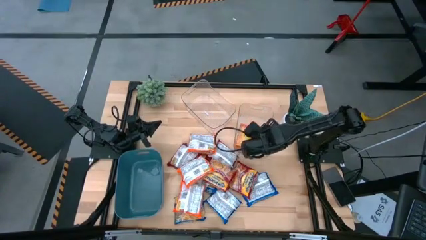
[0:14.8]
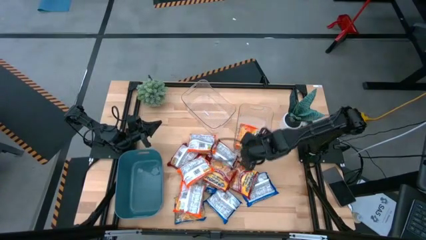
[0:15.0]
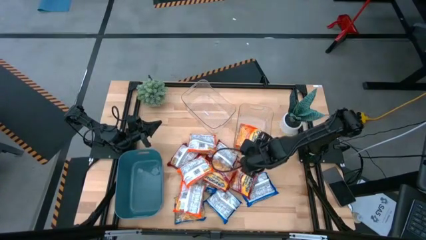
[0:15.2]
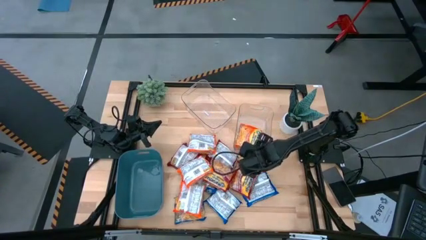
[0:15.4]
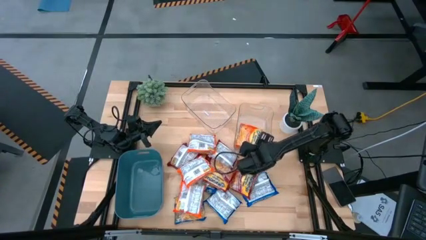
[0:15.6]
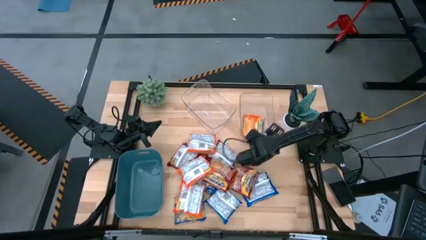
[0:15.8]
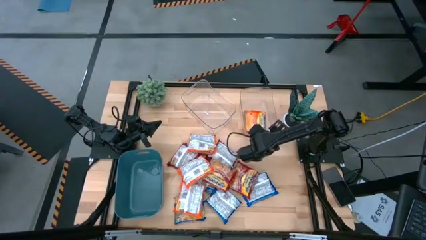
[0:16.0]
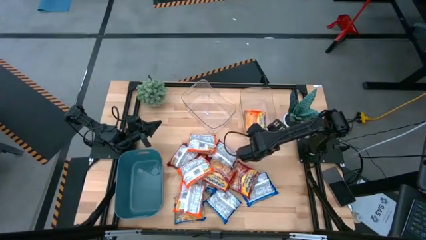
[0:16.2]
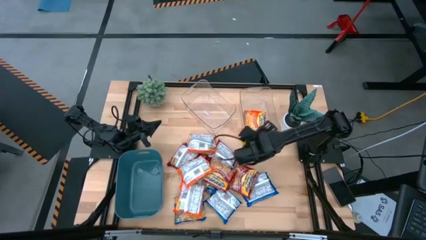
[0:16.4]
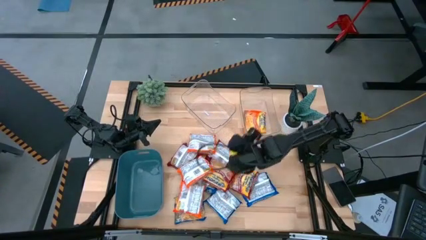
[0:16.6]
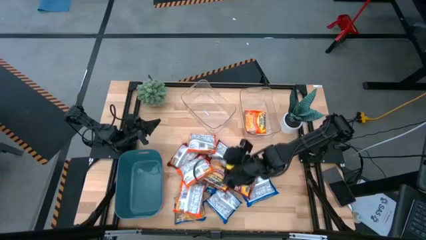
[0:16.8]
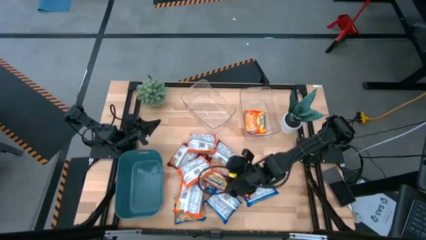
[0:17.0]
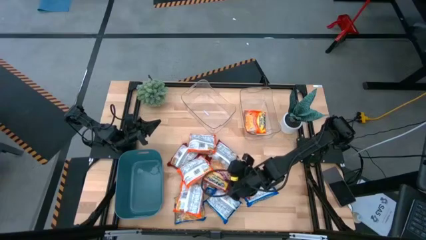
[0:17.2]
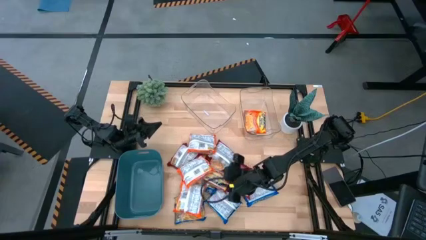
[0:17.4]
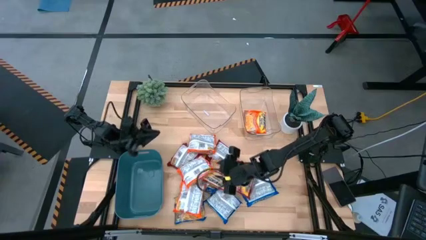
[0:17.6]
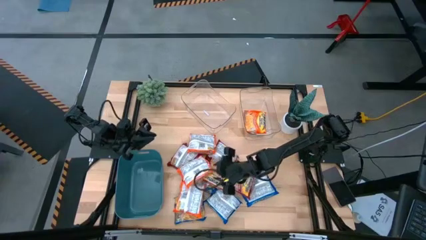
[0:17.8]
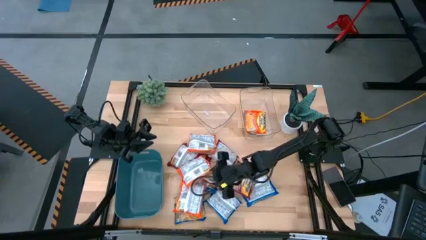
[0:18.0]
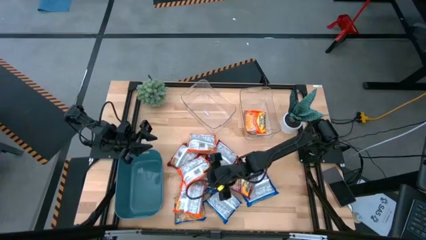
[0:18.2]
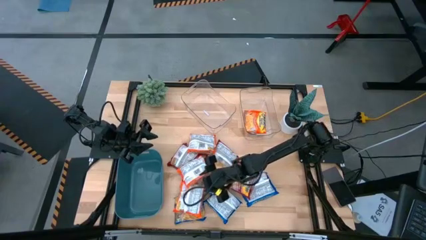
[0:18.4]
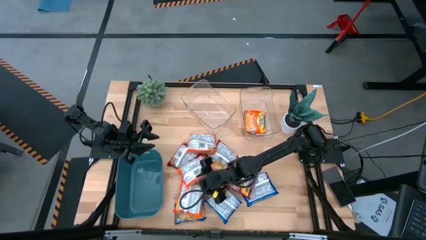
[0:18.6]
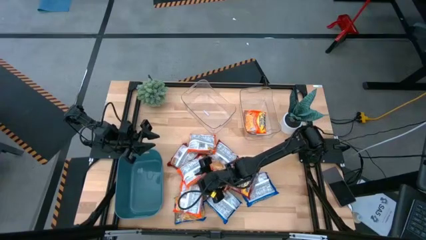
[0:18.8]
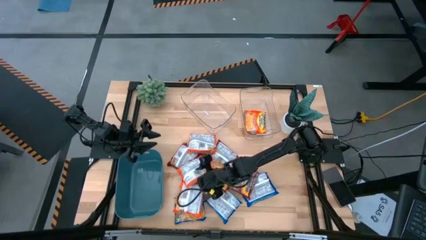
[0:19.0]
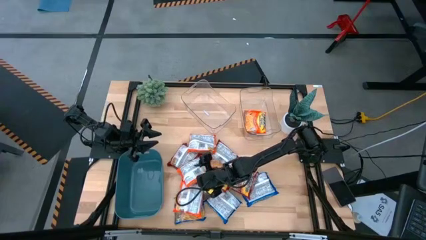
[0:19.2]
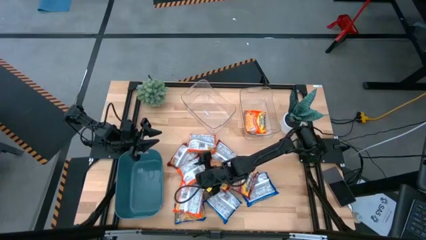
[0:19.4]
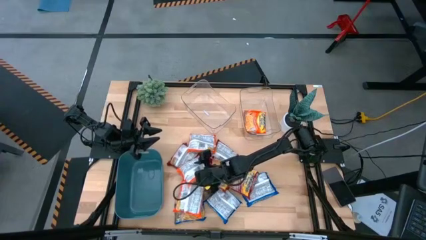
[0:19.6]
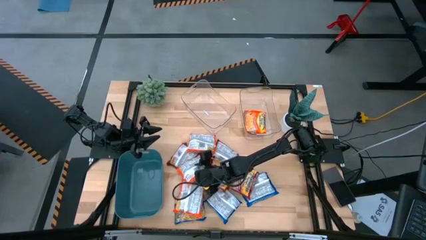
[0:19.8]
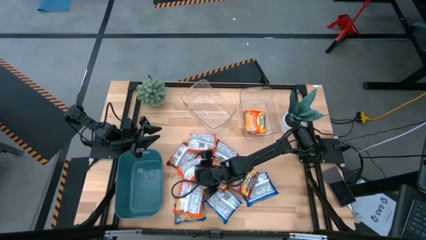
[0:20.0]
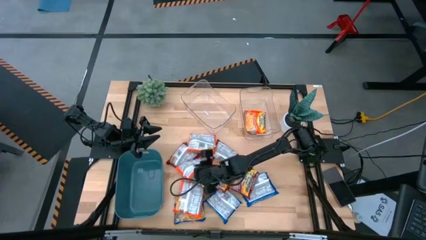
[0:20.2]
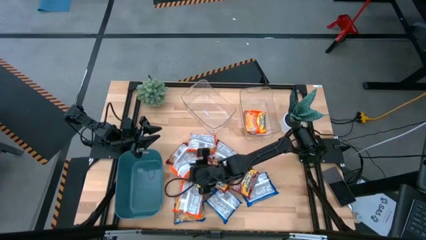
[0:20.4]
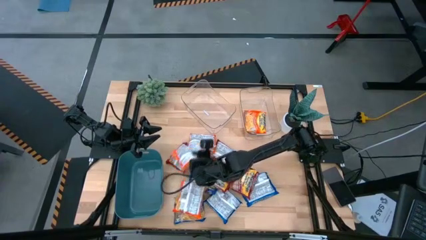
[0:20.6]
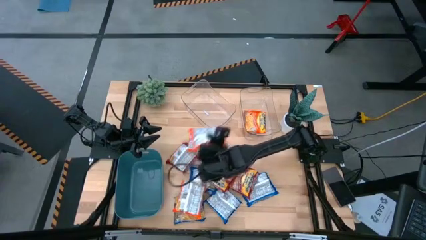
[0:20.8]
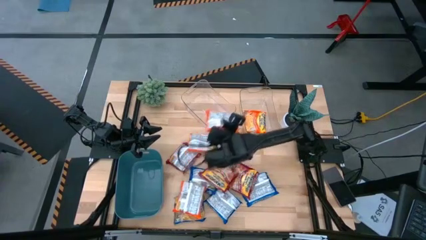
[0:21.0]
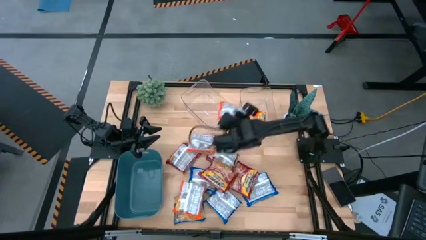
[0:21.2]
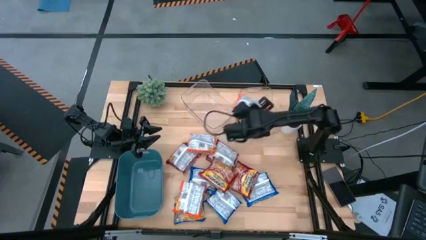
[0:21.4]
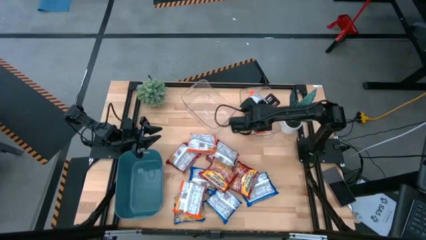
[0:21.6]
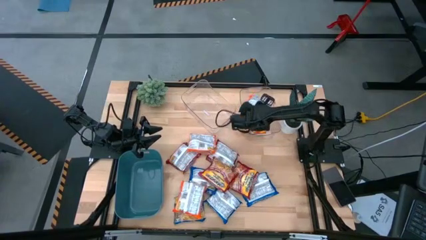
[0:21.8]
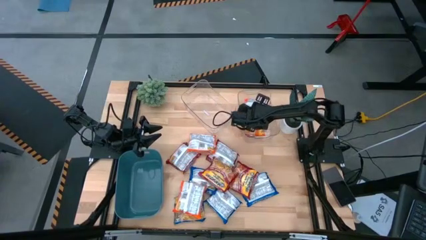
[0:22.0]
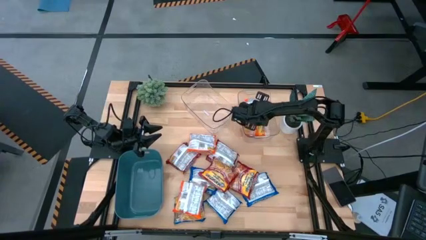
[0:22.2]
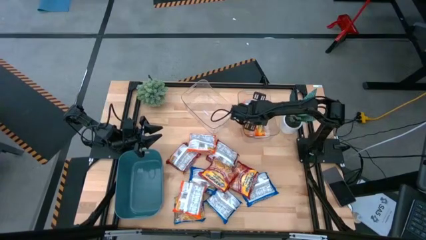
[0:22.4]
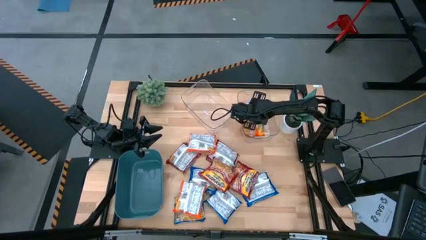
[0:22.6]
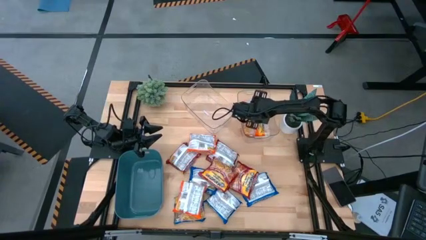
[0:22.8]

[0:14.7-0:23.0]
Task: Sort Maruchan noodles
Put the orange noodle pack into the right transparent bin

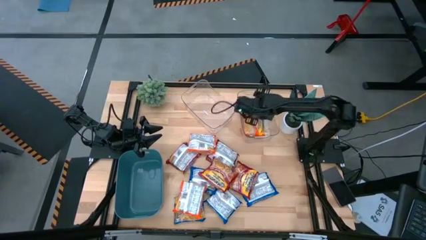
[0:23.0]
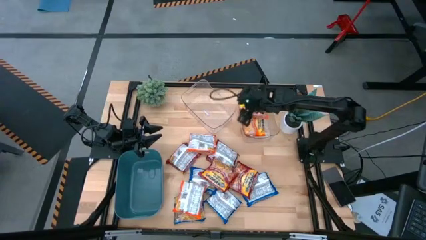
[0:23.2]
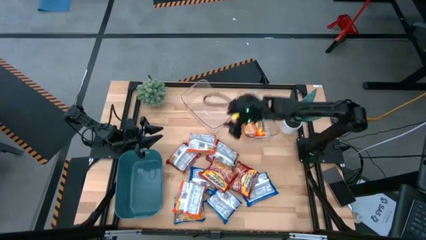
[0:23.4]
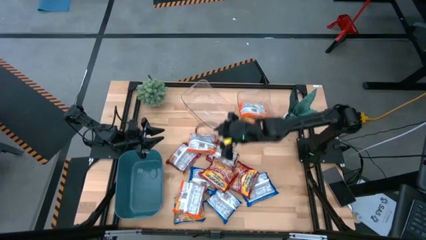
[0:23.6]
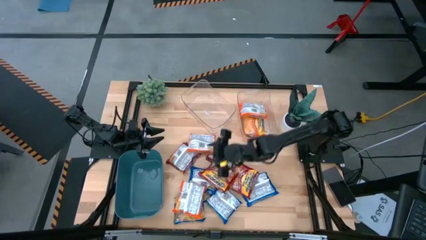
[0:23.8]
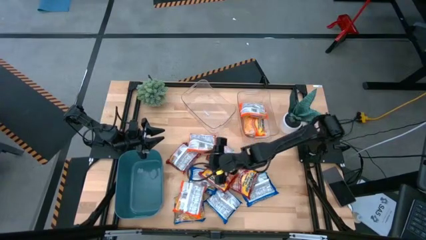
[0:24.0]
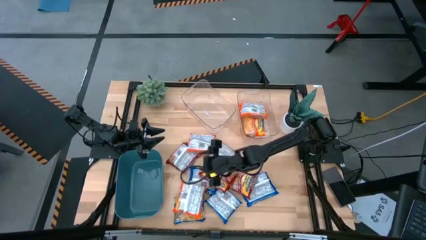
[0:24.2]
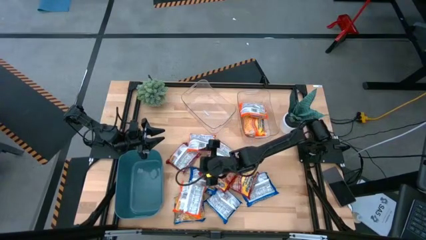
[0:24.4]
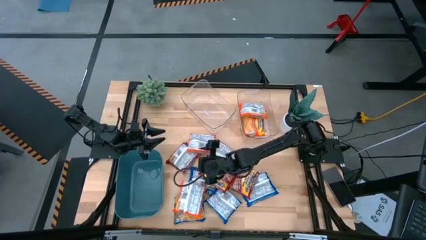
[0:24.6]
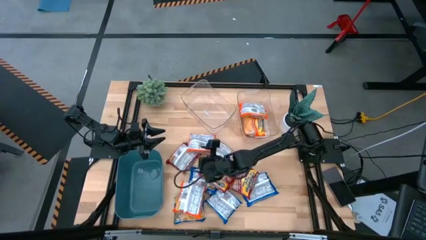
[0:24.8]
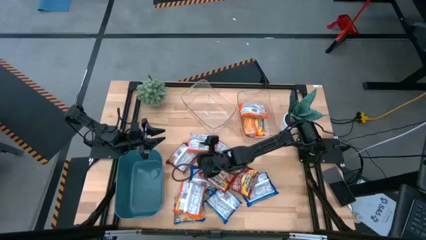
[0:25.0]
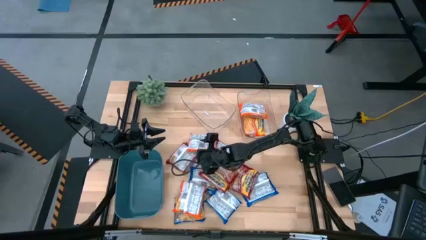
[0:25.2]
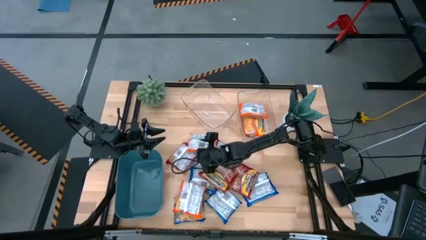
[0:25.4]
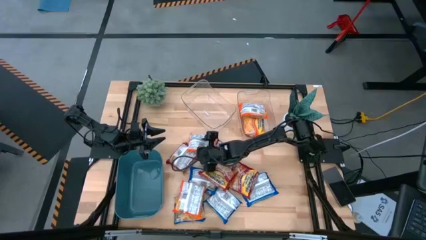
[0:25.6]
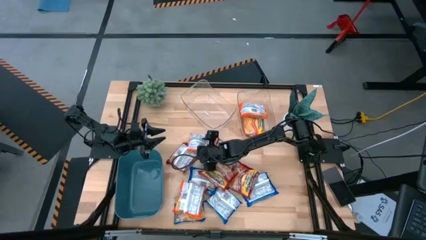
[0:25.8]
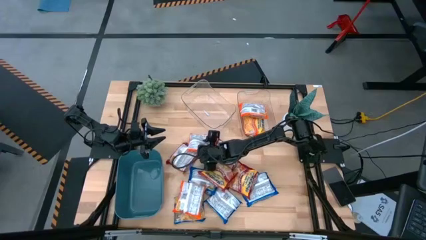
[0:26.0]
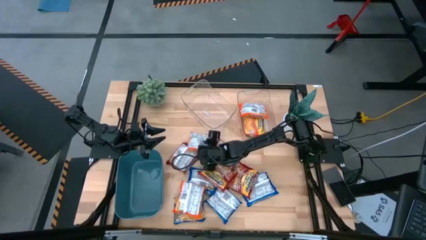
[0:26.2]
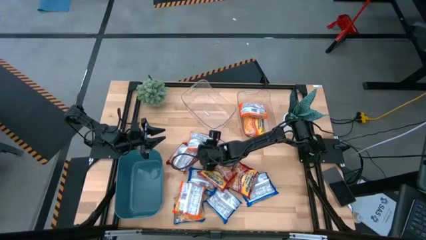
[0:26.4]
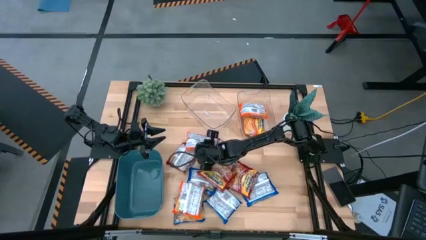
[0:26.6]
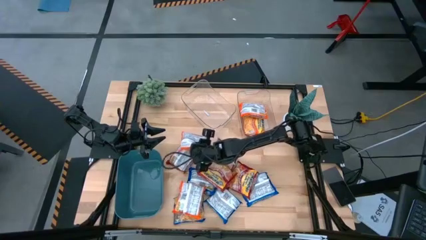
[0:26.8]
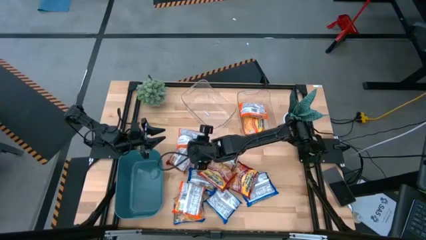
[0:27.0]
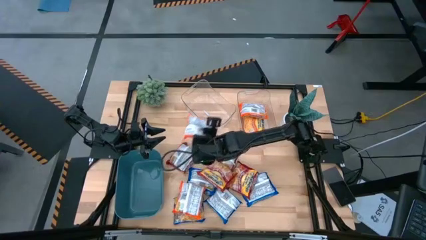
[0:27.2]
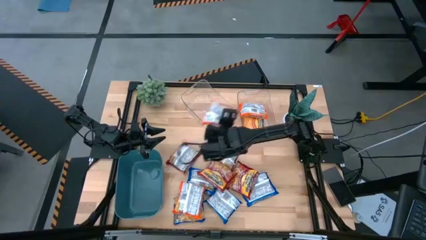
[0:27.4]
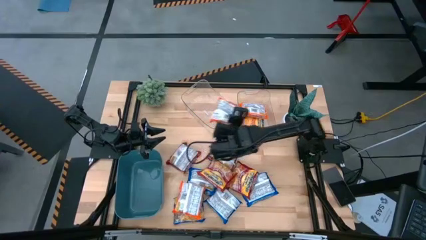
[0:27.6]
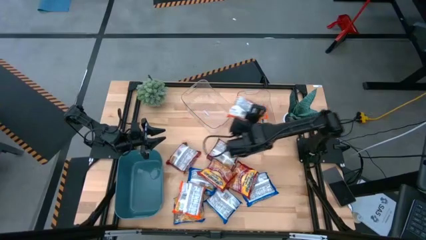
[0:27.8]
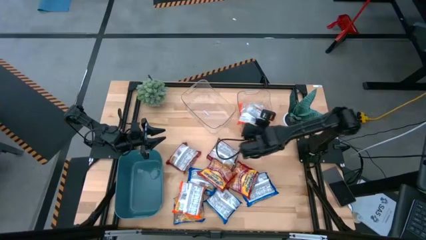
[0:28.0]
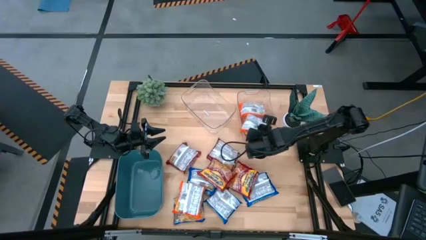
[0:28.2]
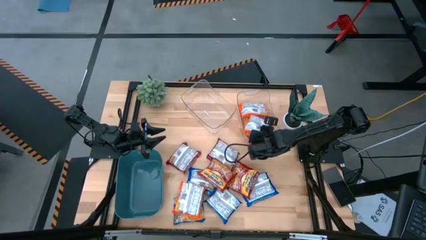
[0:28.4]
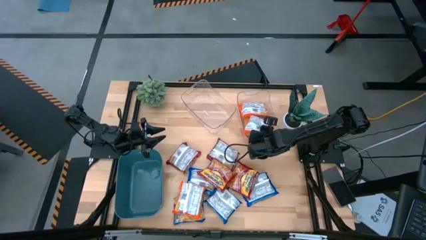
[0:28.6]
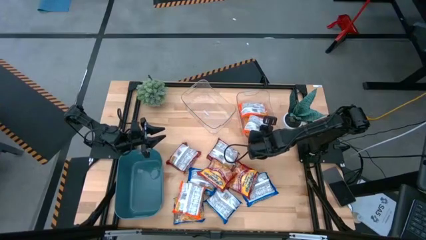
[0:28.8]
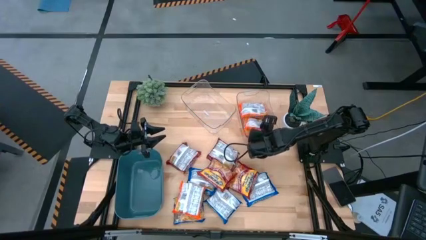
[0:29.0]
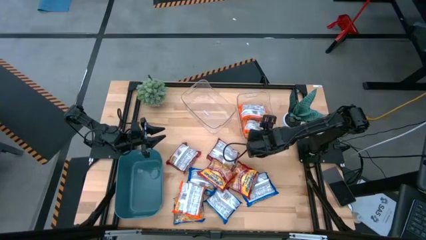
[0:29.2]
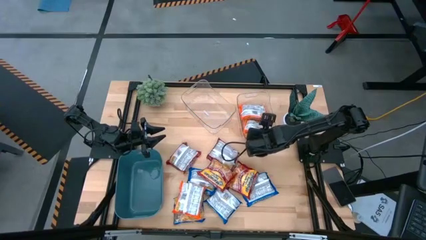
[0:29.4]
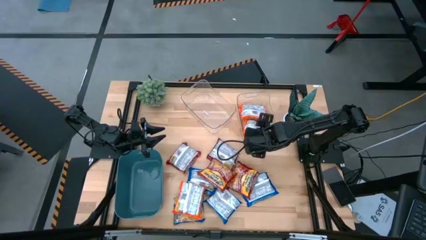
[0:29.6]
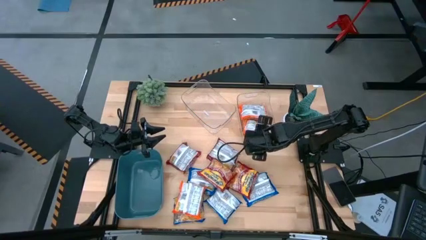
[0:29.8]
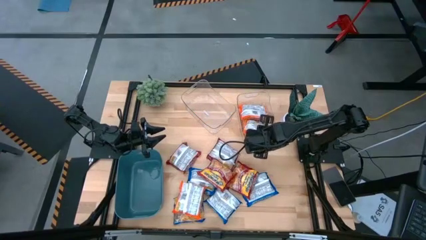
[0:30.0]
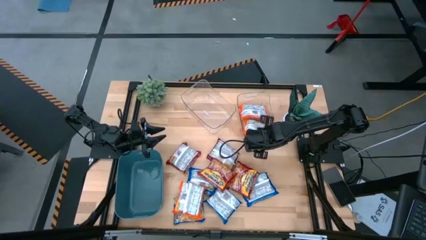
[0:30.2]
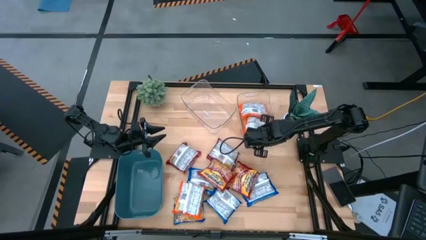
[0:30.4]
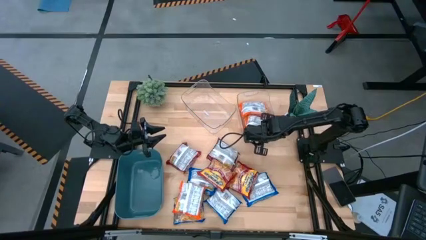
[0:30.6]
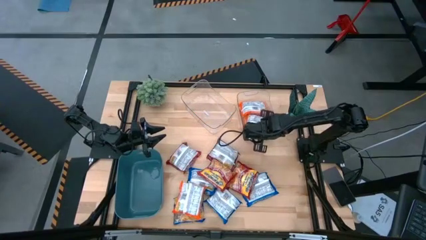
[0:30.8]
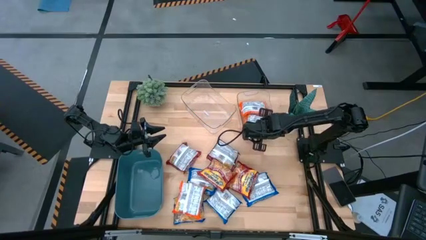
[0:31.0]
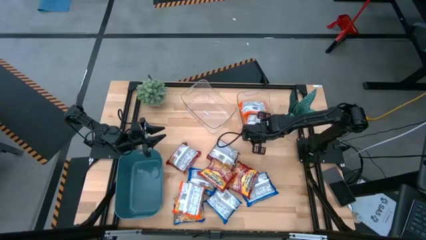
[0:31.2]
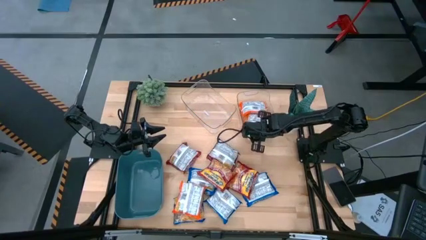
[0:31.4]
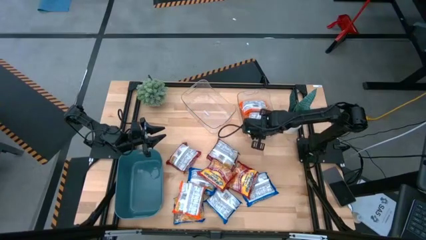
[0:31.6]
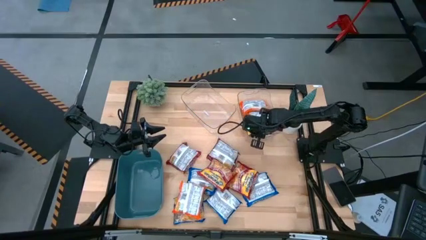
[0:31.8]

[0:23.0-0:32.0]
Put the orange noodle pack into the right transparent bin
